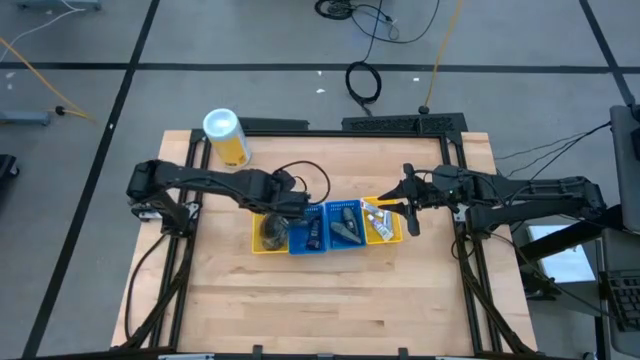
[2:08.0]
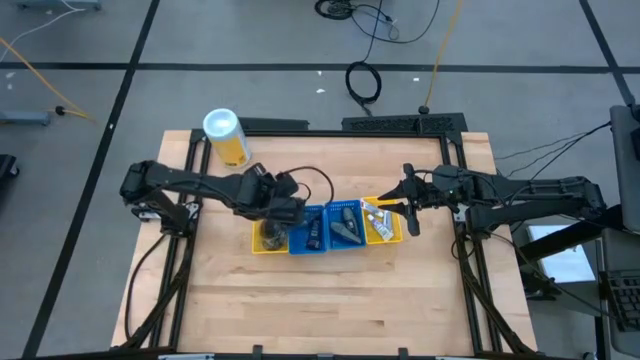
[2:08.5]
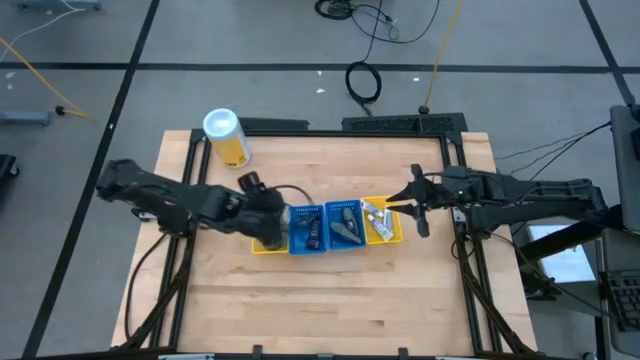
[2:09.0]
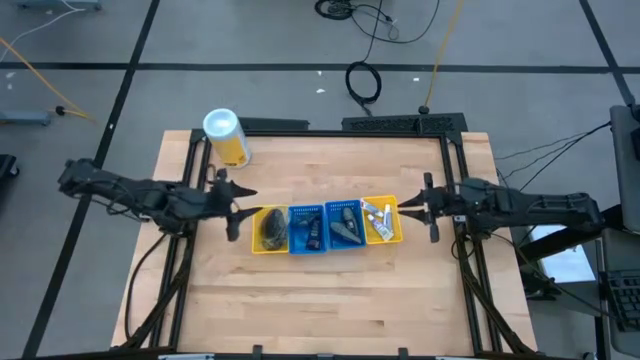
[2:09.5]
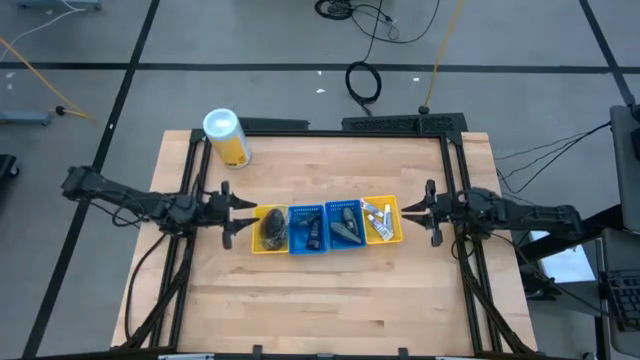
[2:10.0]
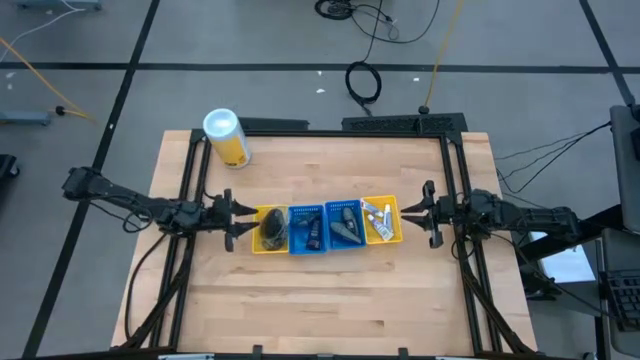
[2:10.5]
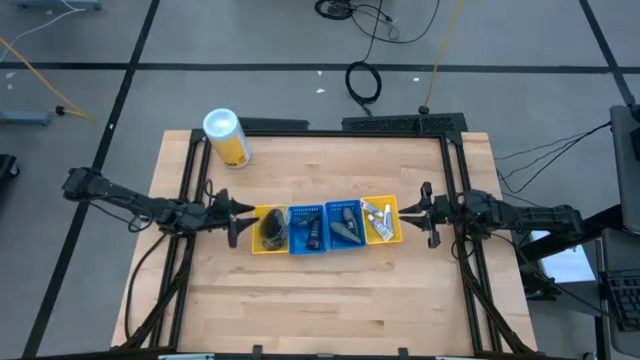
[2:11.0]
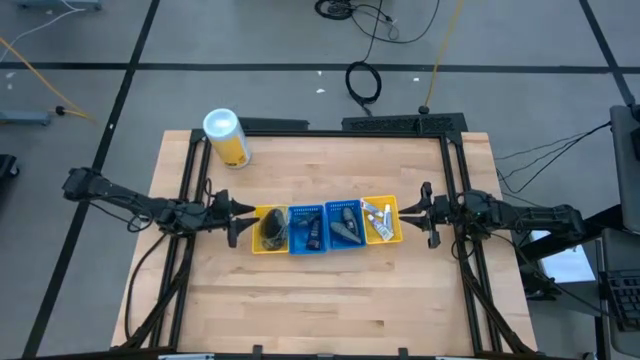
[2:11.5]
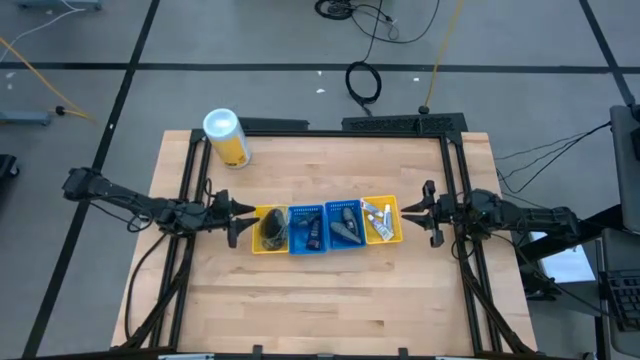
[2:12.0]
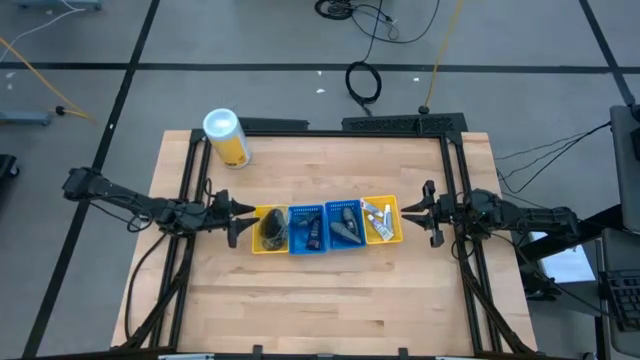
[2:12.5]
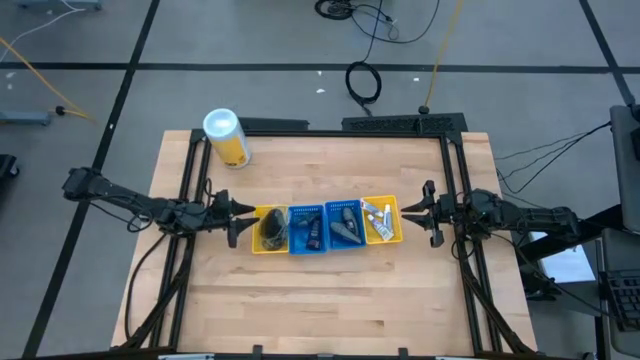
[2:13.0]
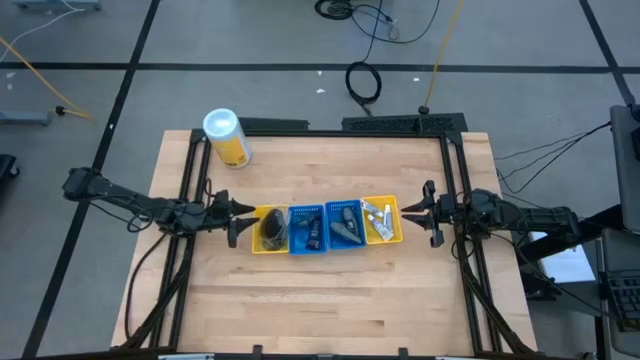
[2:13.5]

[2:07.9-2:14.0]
Task: Pick & Place Travel size toiletries
Return to Home Position

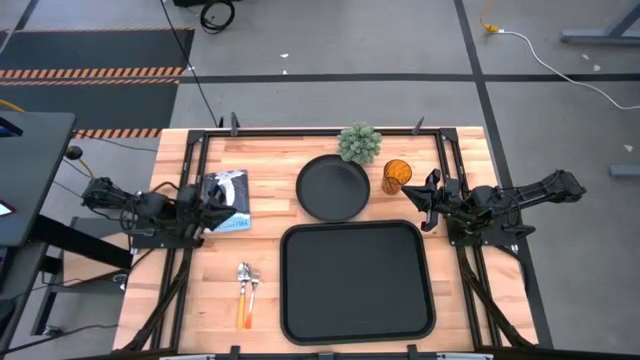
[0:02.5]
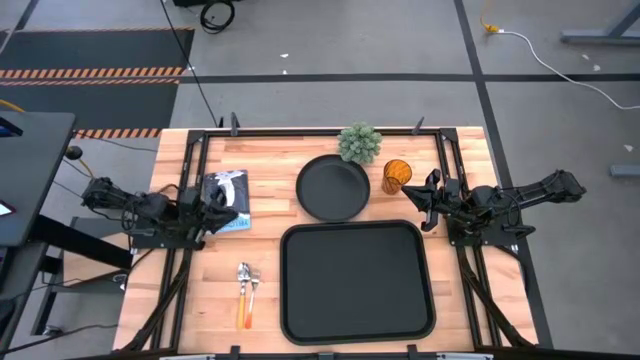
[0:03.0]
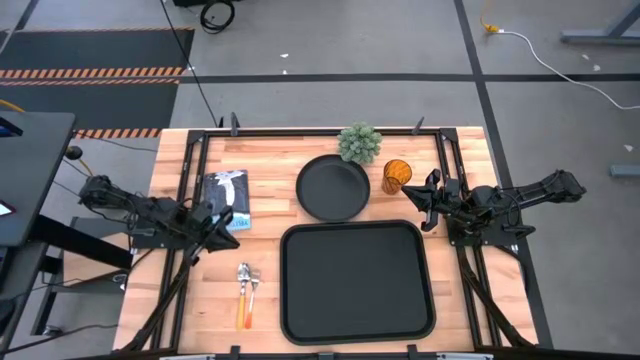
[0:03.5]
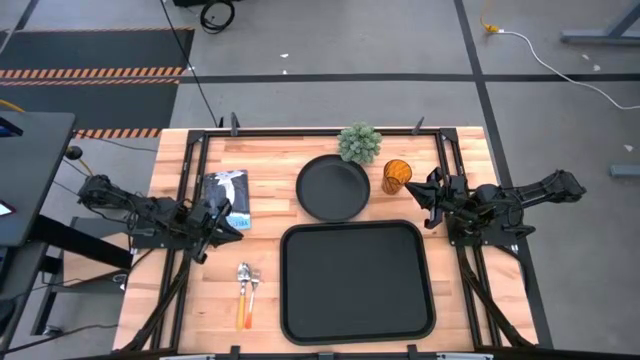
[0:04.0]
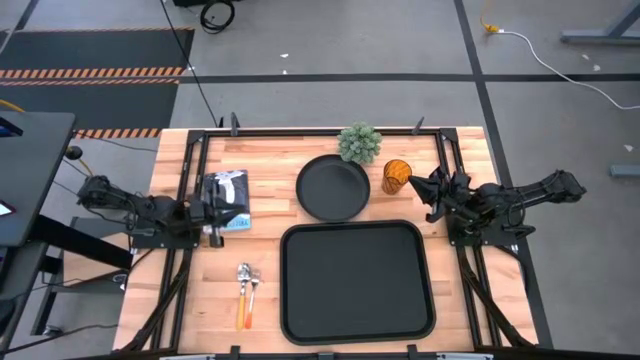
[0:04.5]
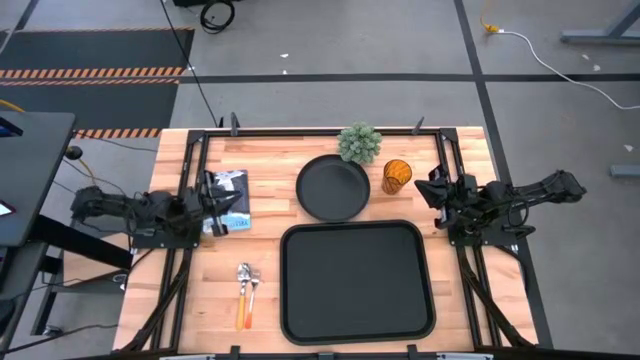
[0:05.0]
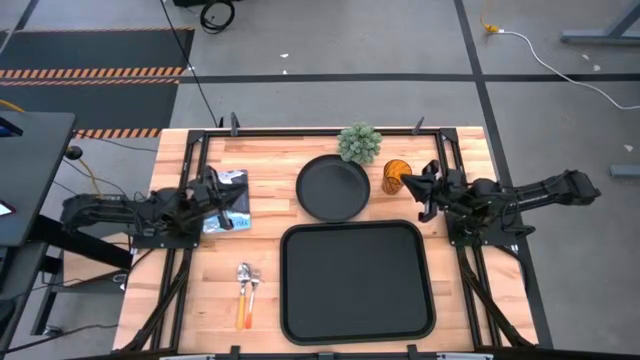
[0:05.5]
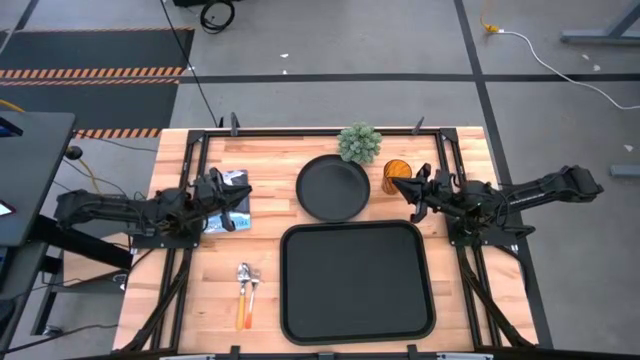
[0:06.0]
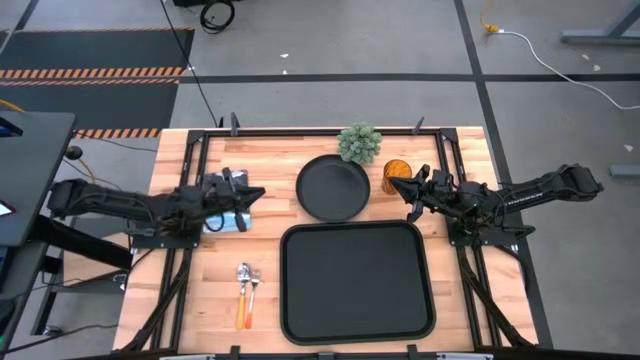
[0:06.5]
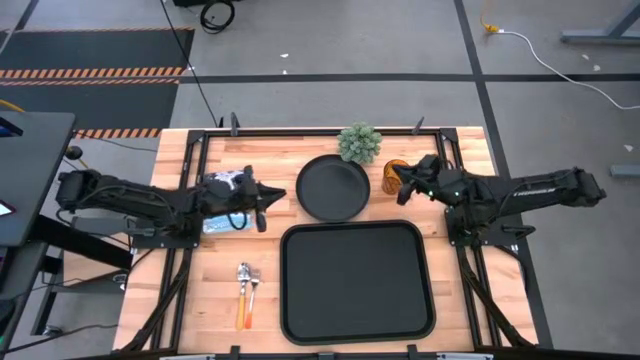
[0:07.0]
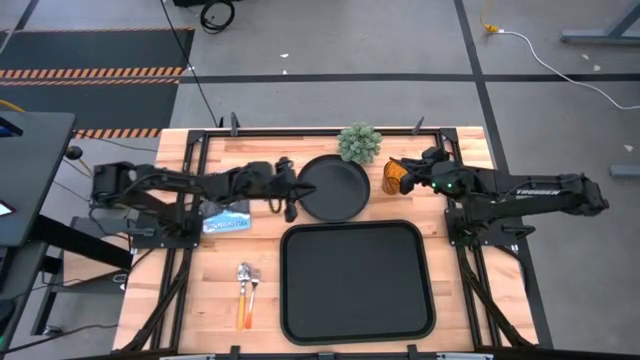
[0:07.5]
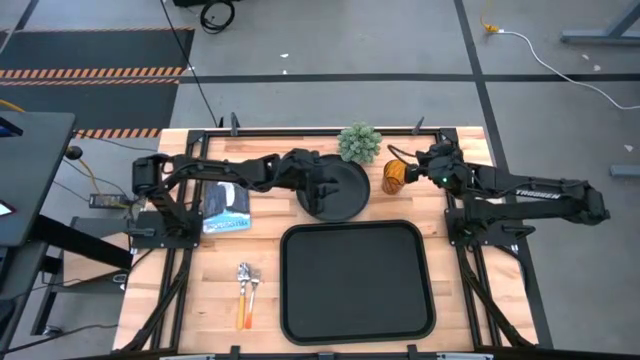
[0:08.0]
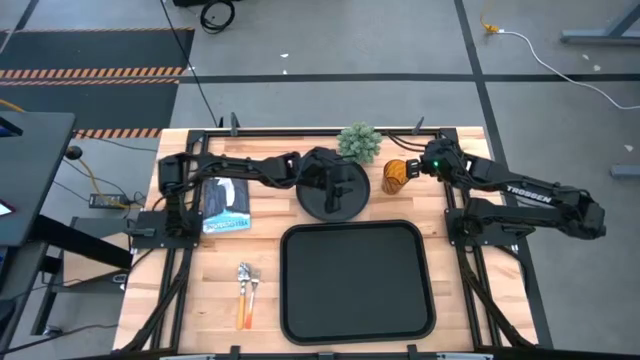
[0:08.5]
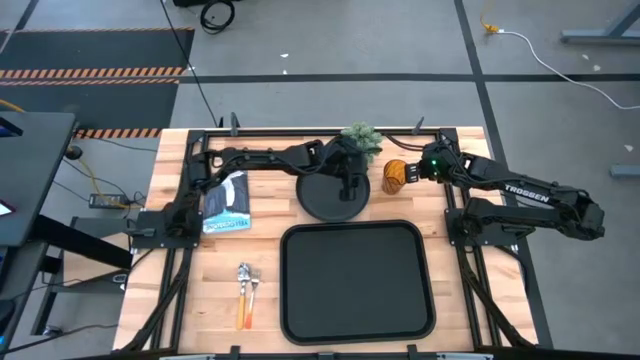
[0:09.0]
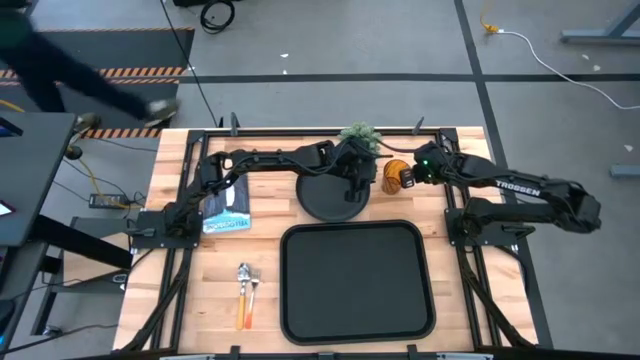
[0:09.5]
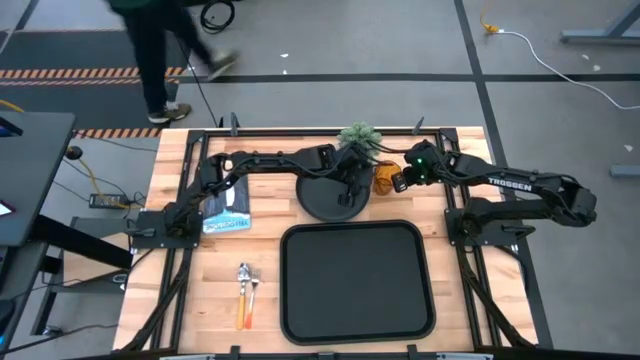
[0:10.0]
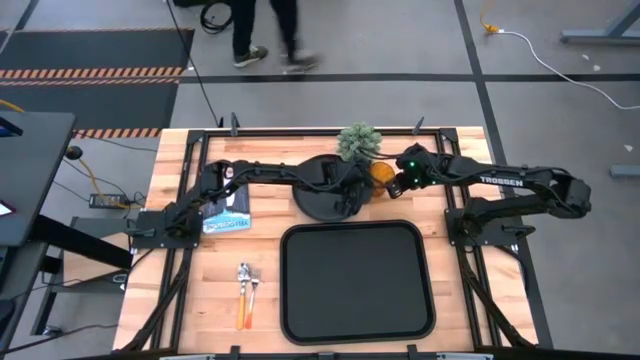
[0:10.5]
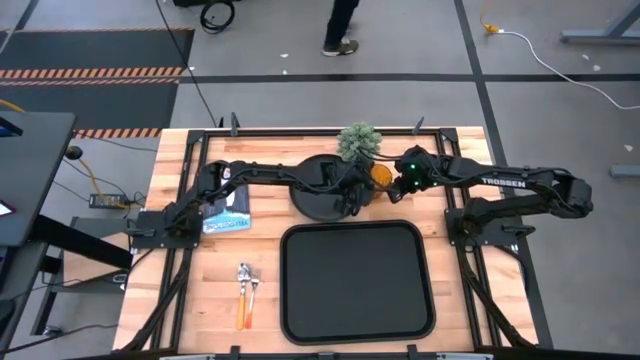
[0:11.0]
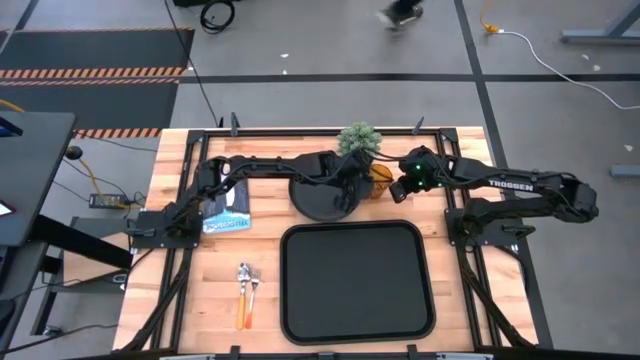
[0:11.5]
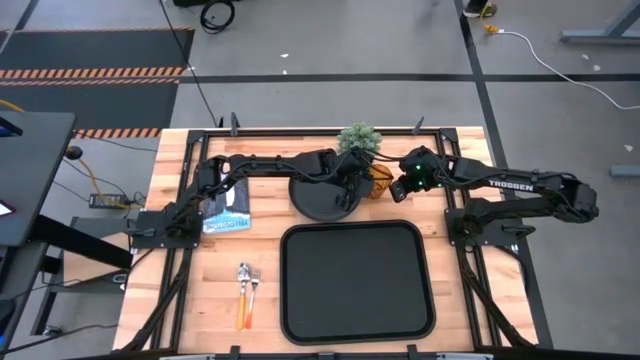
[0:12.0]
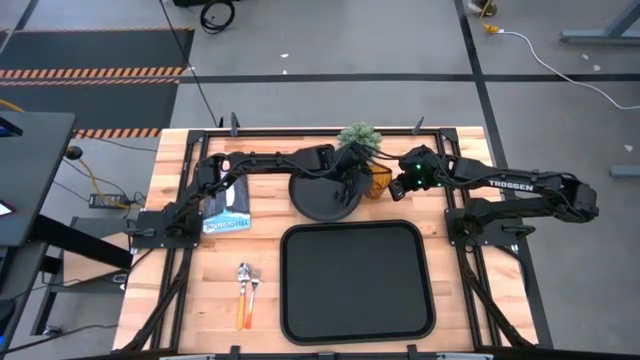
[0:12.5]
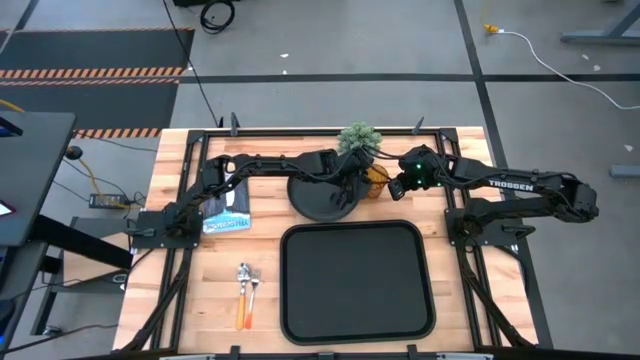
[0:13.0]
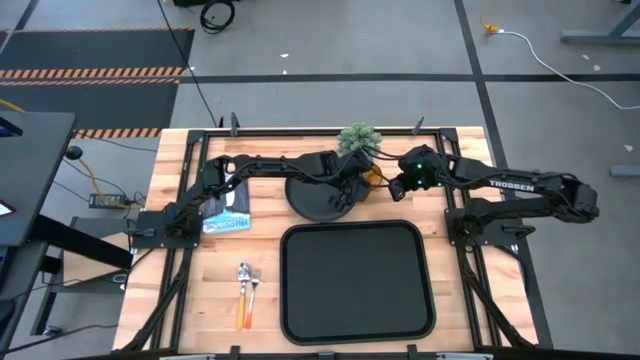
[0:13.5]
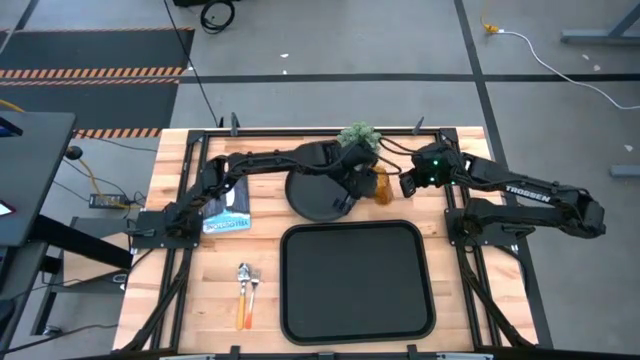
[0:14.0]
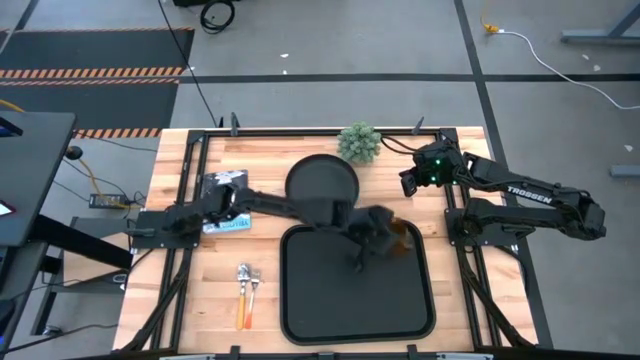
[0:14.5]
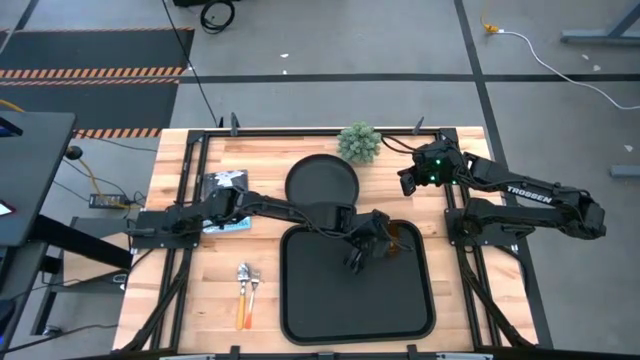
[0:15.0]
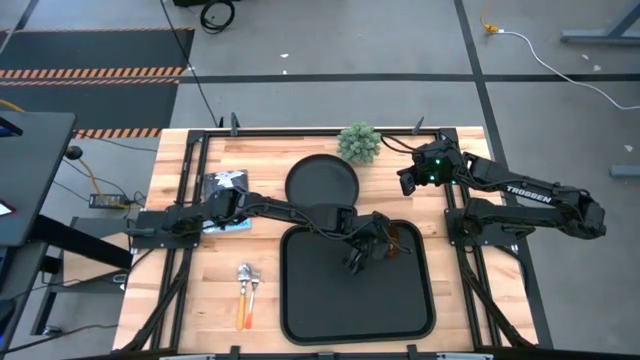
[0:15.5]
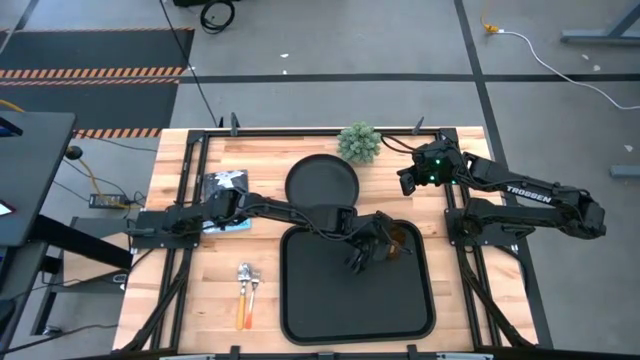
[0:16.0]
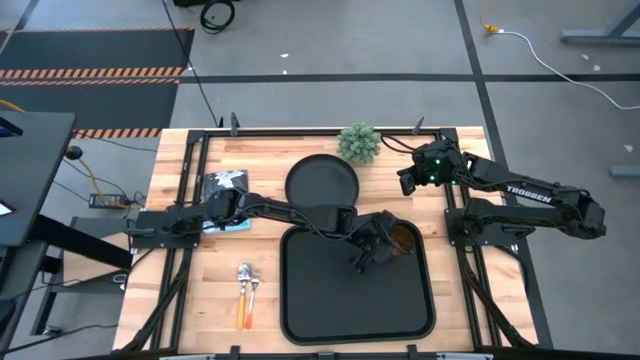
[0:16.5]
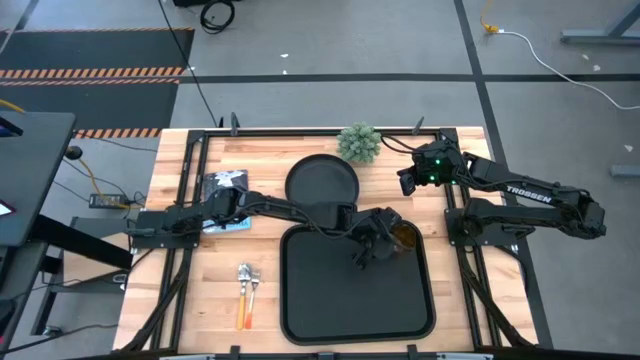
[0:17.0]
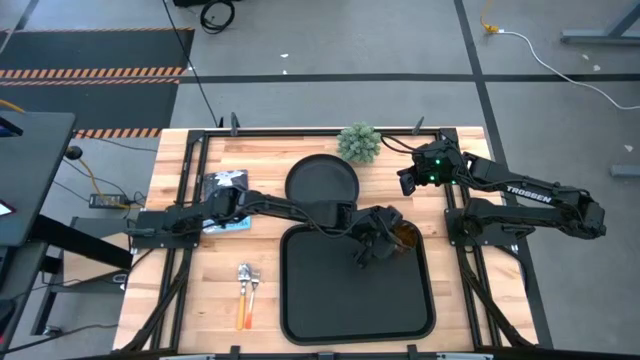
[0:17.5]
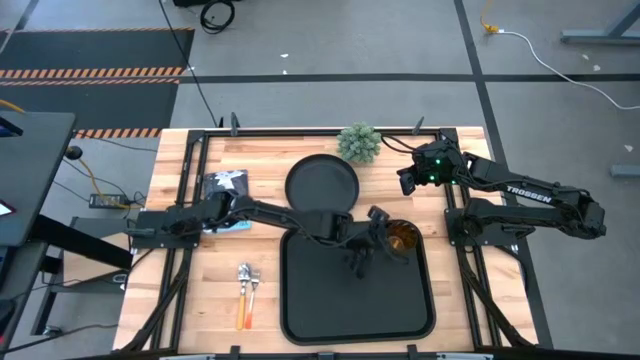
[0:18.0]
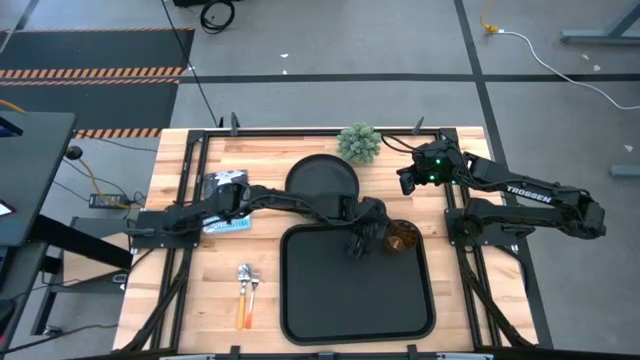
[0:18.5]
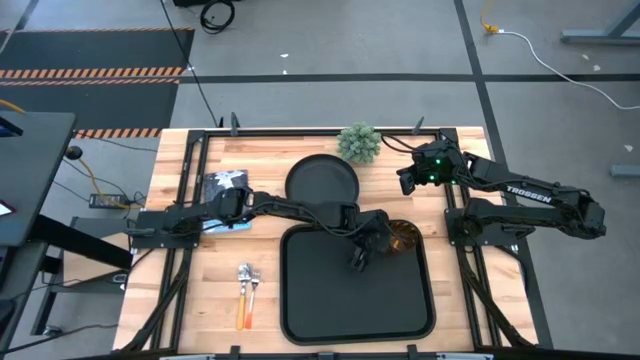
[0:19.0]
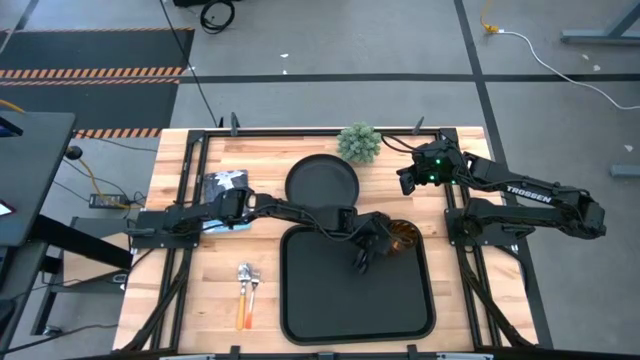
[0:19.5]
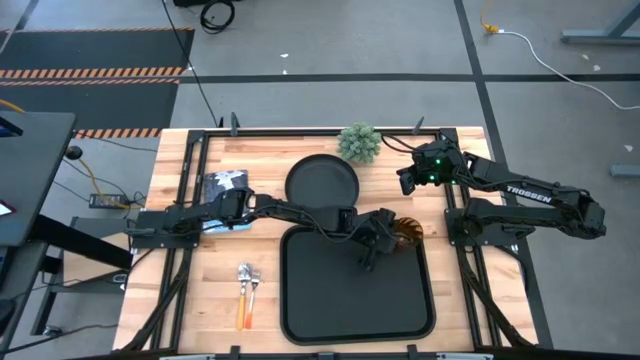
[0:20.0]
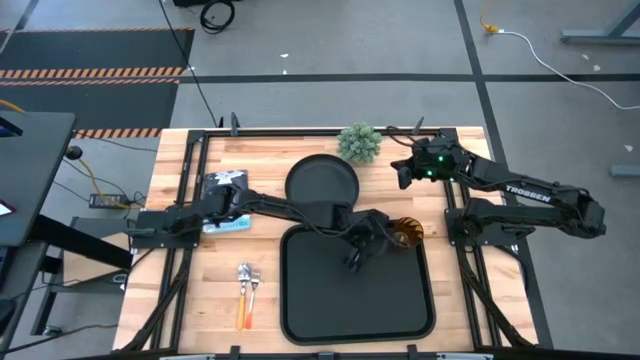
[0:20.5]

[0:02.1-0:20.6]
Task: Pick and place plate/cup/fork/spoon on tray
Put the brown cup on the top right of the black tray
